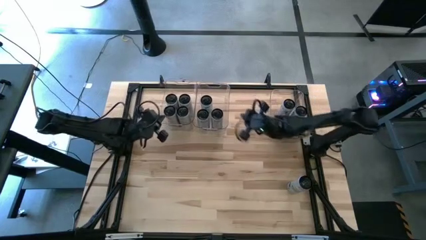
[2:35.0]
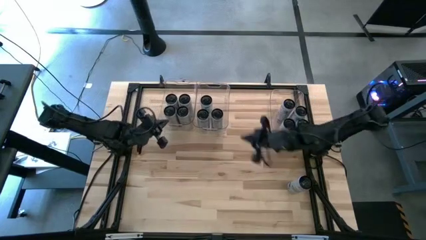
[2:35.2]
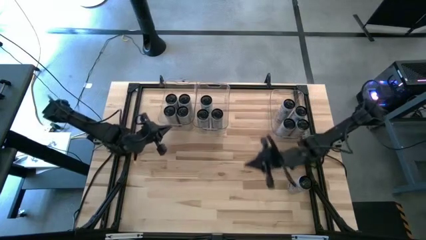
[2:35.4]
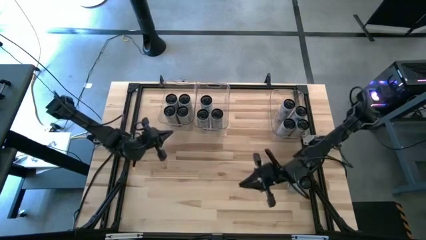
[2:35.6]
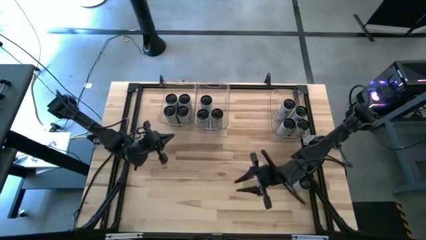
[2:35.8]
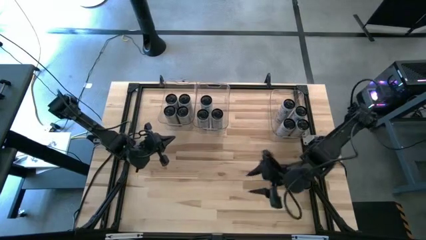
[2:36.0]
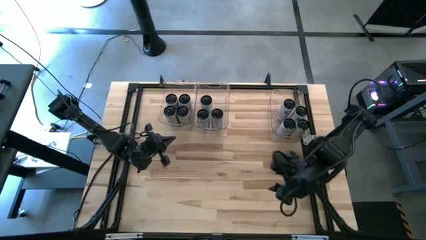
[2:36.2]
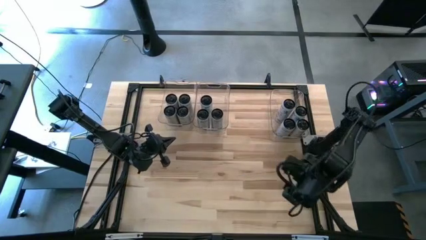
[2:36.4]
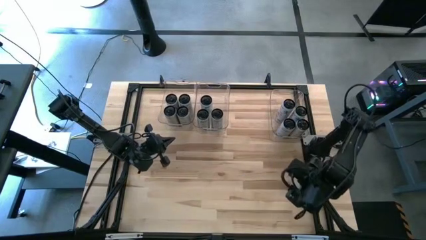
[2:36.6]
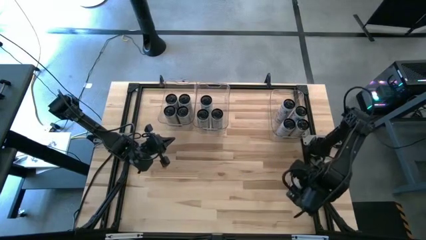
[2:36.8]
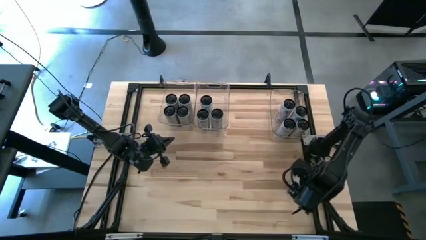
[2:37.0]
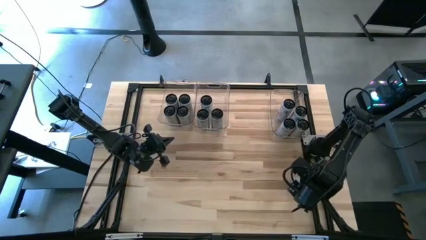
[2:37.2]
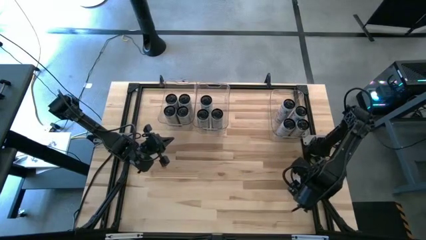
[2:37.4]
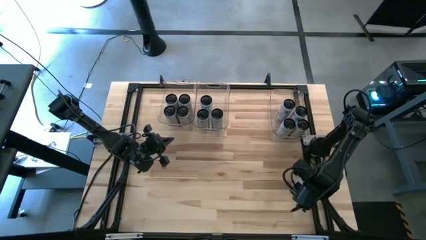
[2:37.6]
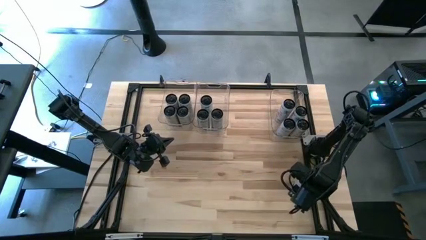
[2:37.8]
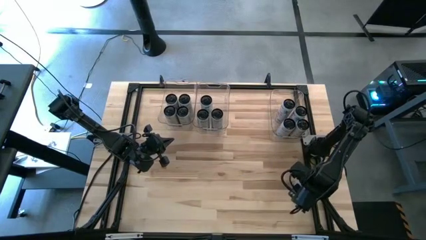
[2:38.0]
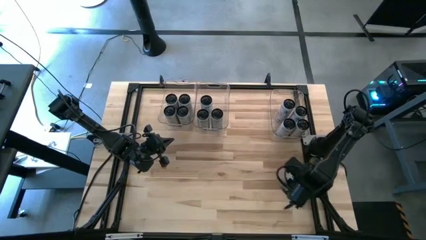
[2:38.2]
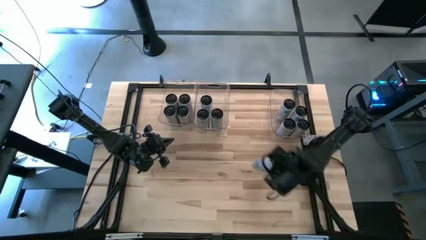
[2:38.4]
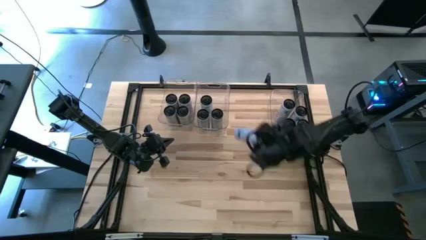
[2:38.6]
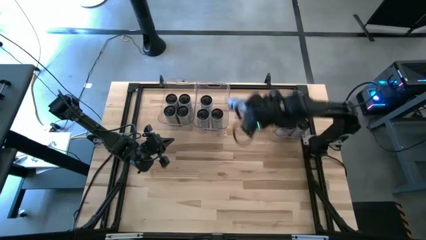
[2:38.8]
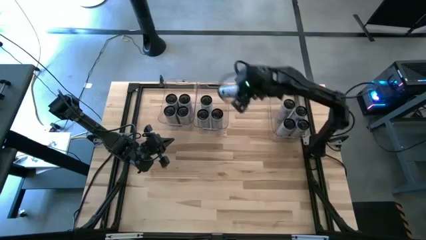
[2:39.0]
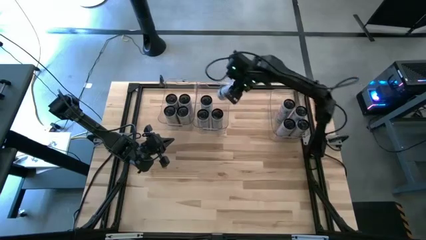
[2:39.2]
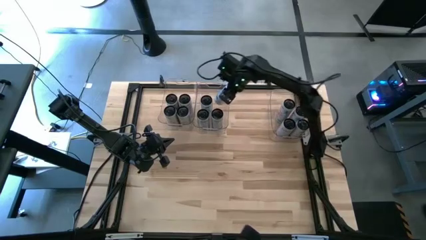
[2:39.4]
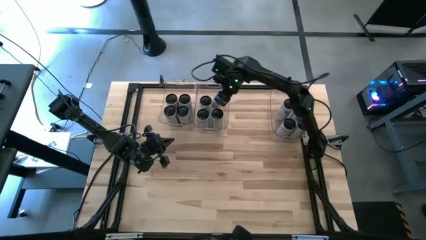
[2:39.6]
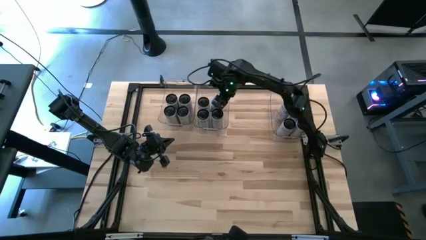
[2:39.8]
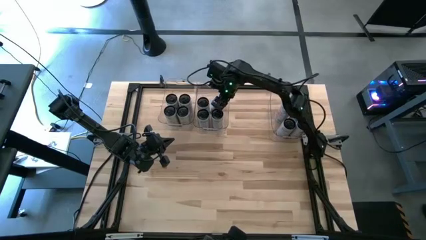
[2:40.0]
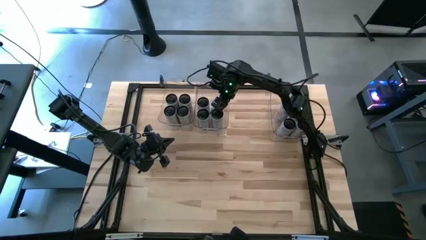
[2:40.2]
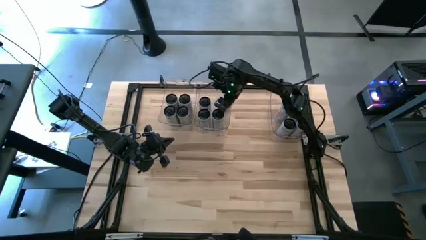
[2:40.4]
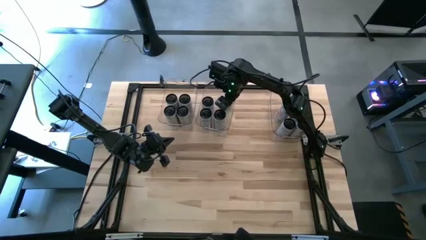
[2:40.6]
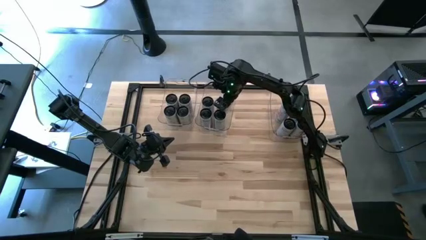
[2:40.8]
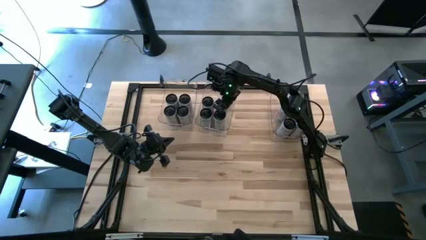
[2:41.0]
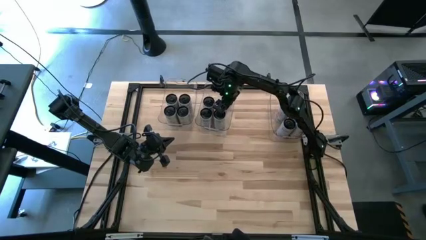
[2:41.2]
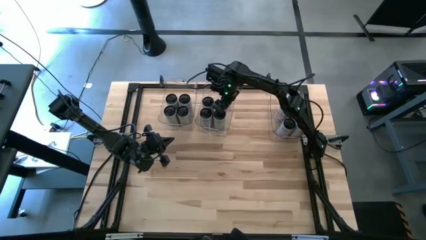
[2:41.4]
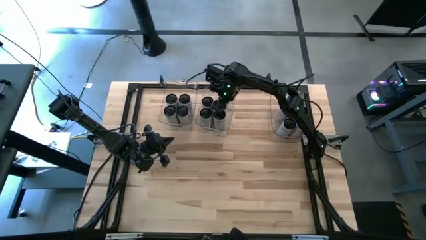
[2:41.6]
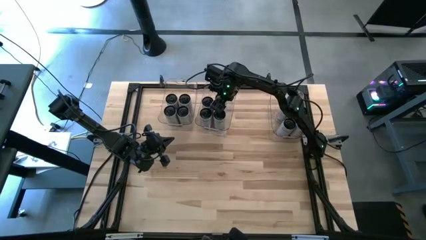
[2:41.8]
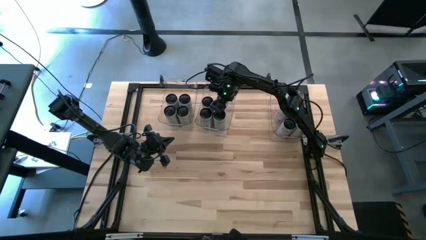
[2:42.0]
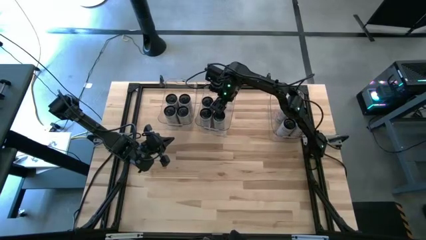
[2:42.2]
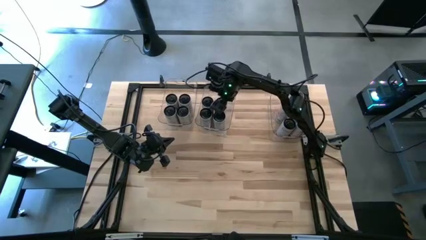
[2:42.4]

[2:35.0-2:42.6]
Task: Sort soda cans
Put the white and blue soda can into the middle transparent bin

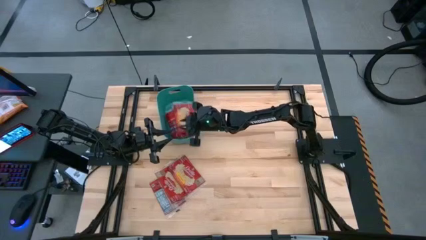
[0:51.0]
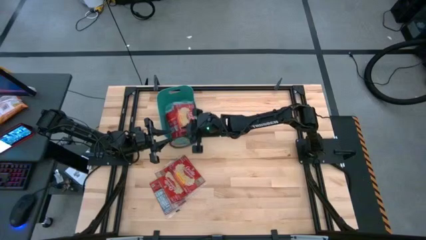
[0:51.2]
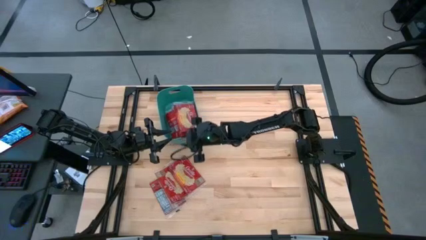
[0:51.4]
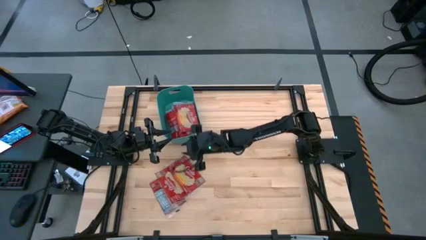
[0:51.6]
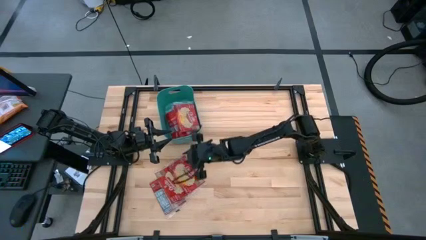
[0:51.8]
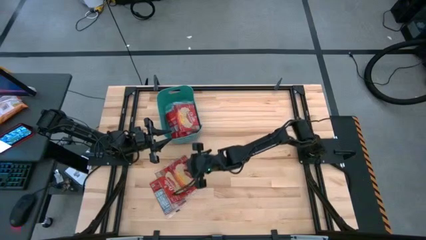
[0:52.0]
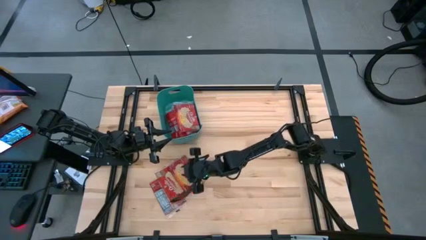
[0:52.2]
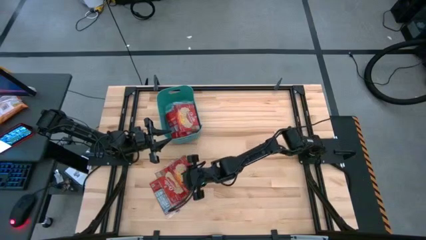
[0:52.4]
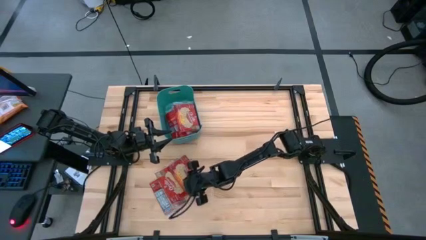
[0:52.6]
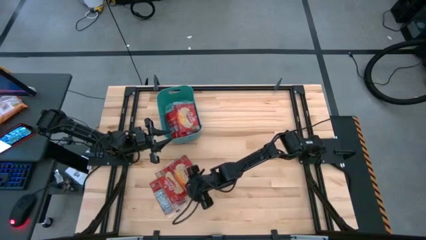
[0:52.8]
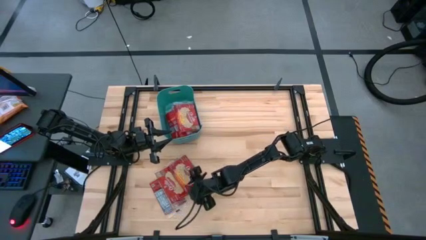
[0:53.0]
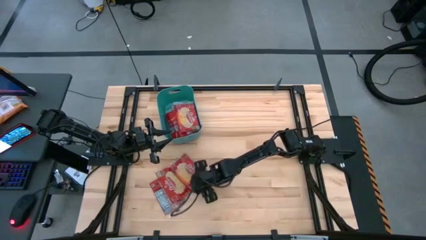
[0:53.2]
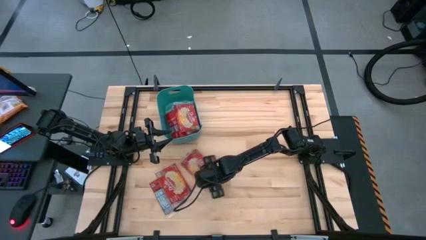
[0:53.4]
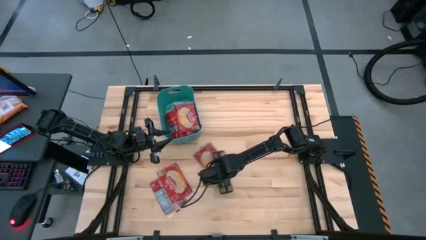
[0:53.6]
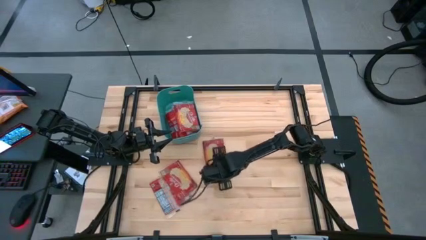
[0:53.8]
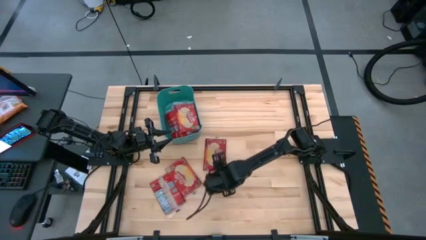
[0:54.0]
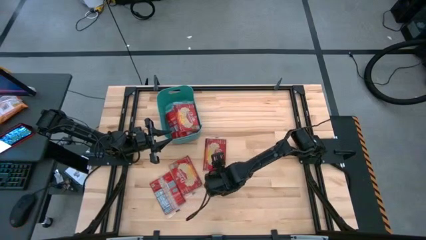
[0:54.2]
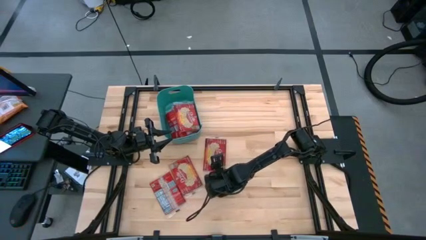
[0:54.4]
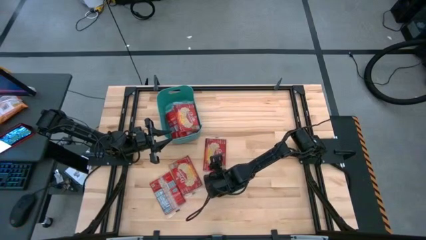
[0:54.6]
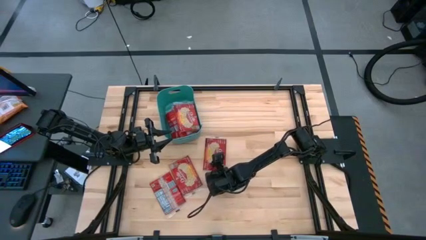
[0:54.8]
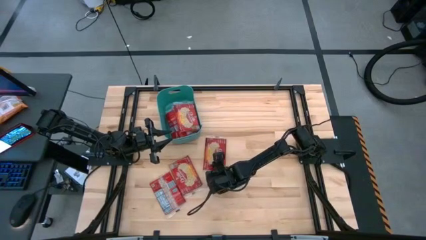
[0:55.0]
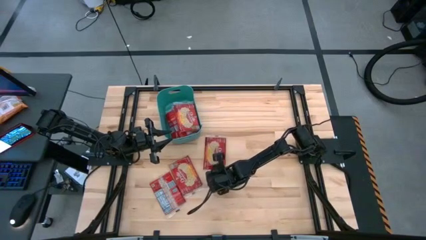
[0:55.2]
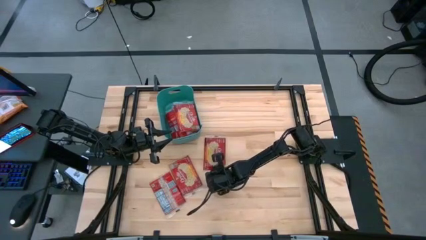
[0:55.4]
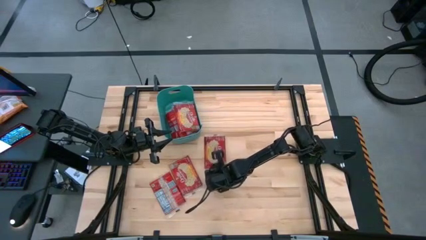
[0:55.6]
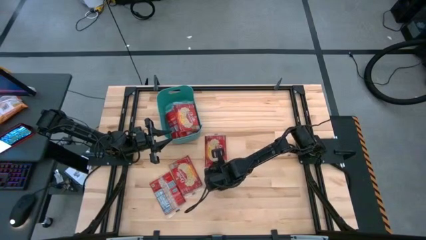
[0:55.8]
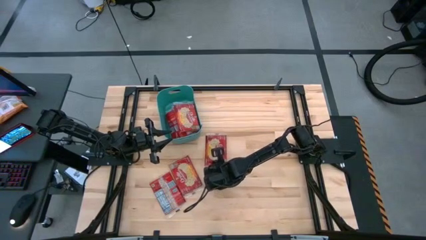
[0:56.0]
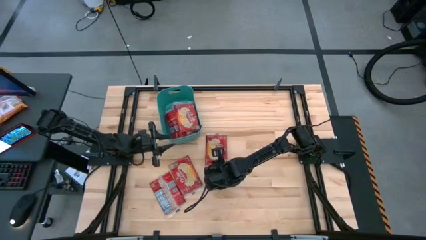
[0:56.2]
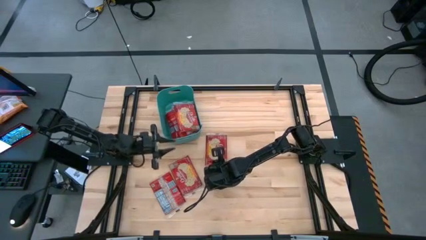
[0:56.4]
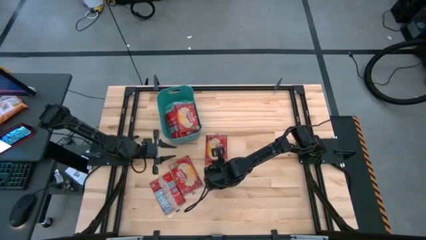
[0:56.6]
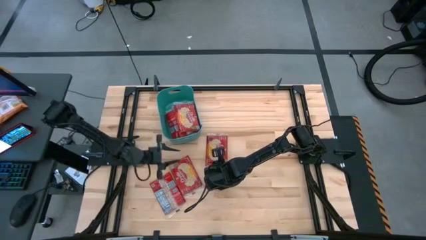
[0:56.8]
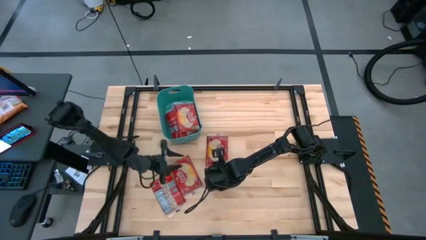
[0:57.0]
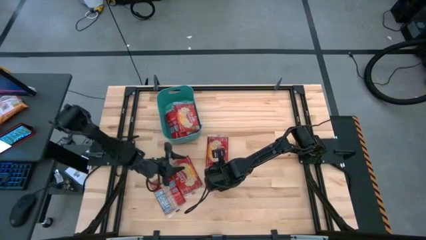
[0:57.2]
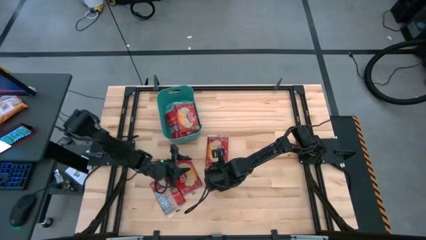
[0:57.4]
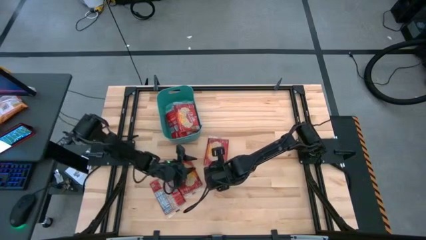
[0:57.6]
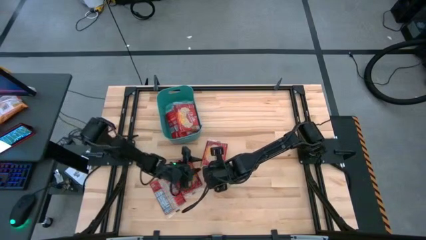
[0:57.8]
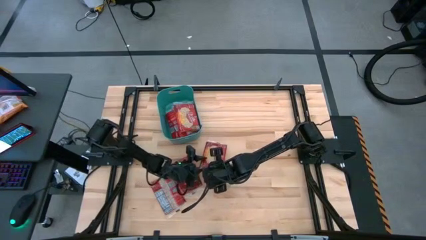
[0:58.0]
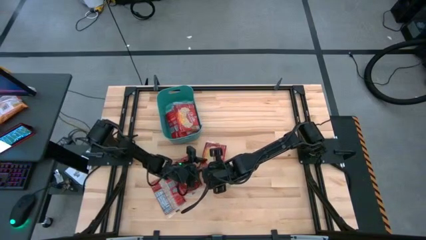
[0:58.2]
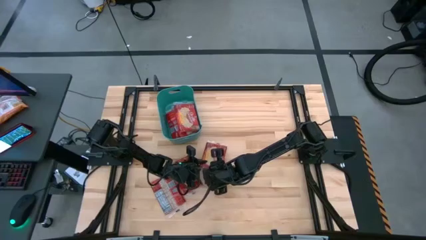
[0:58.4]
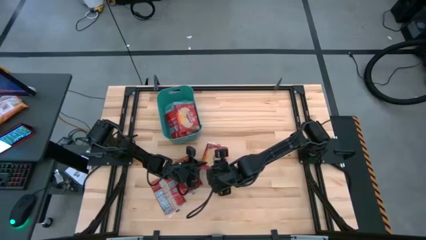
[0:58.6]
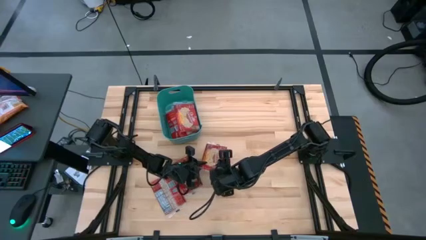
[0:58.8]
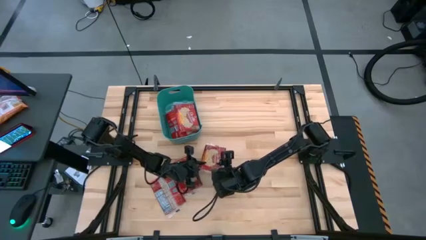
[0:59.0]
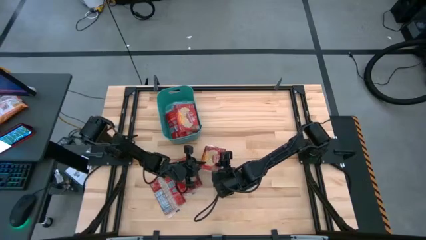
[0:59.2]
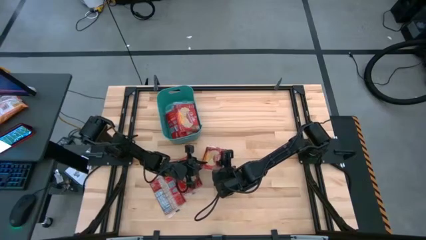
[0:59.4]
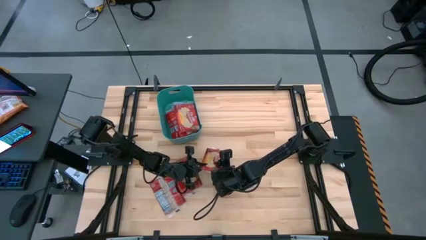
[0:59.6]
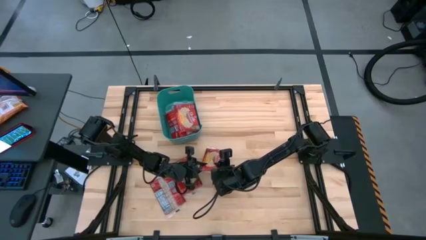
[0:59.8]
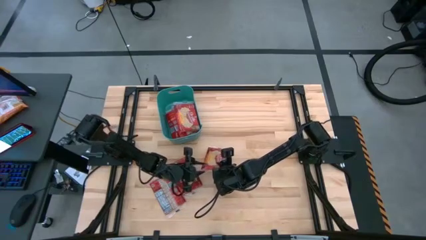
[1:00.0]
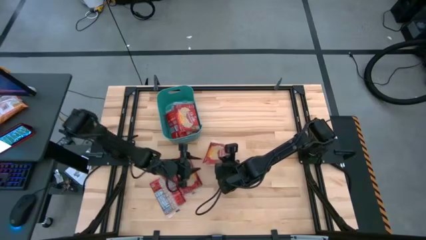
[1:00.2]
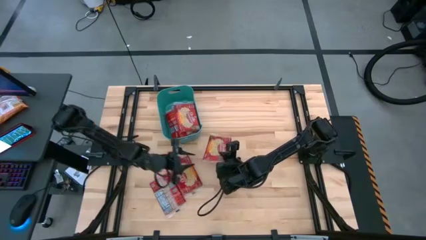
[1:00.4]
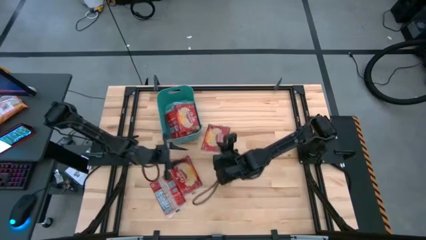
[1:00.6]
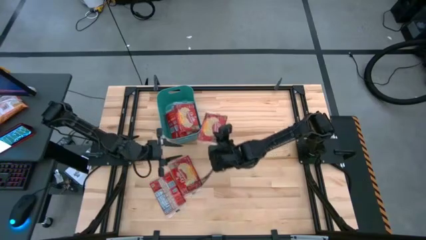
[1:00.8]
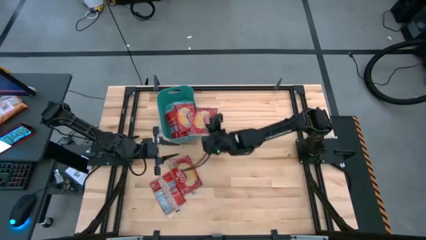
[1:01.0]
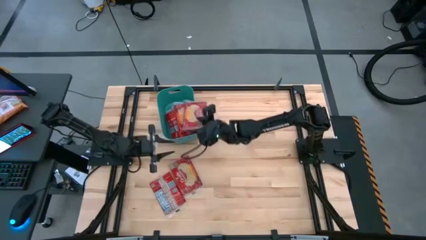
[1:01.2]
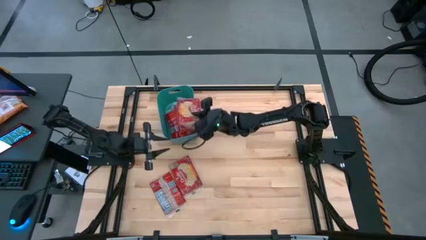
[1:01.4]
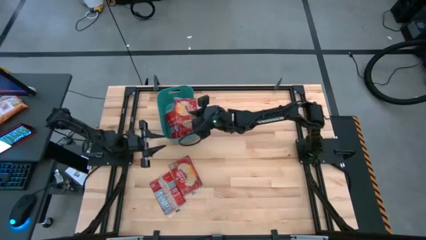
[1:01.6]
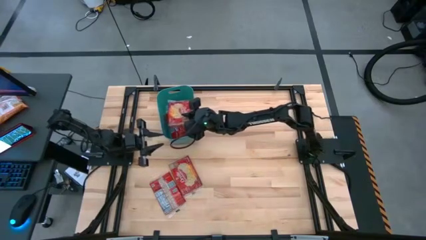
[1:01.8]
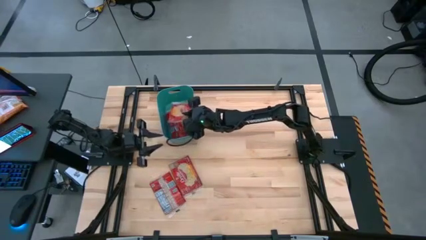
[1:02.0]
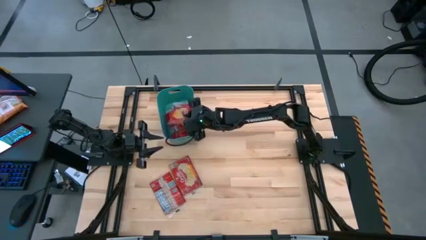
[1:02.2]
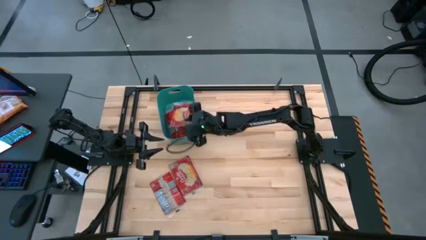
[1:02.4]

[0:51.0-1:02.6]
Task: Sort popcorn bags into baskets
Put the red popcorn bag into the green bin
